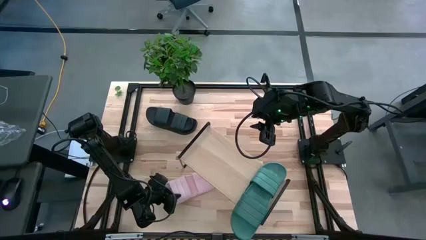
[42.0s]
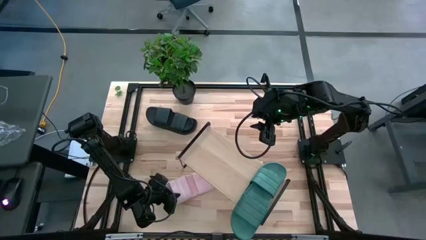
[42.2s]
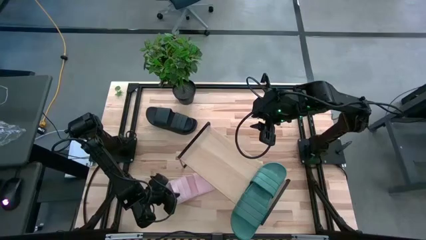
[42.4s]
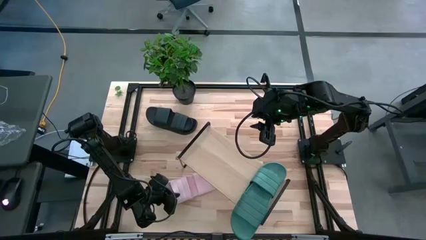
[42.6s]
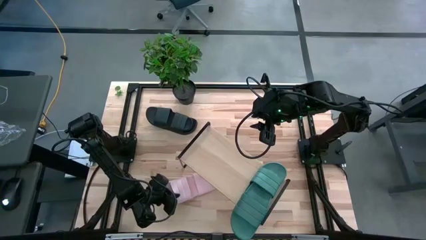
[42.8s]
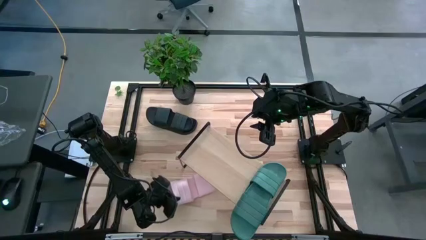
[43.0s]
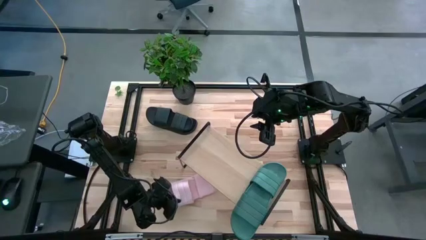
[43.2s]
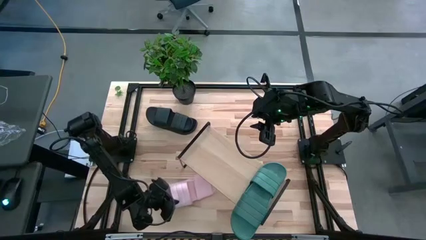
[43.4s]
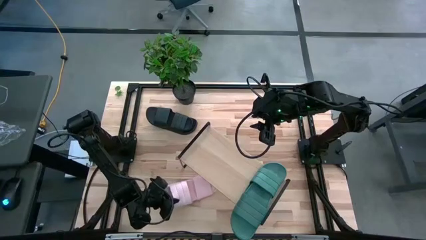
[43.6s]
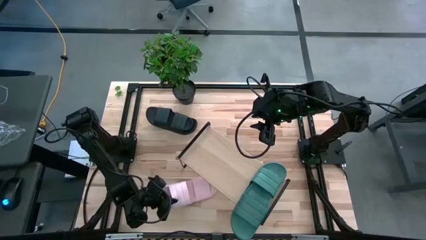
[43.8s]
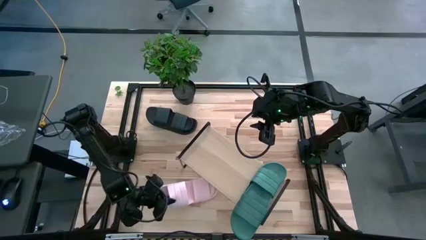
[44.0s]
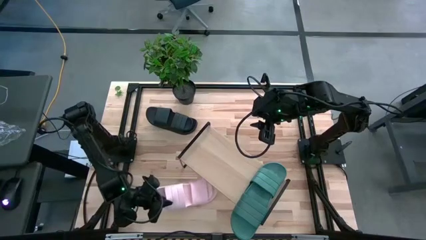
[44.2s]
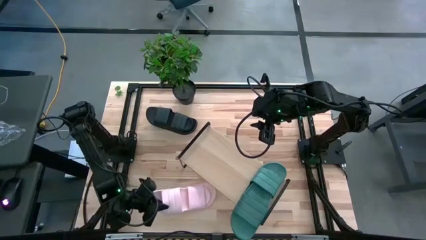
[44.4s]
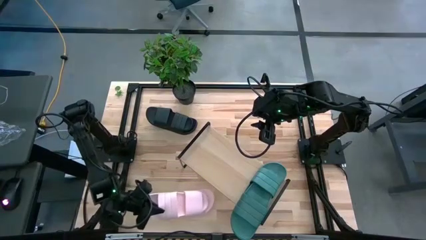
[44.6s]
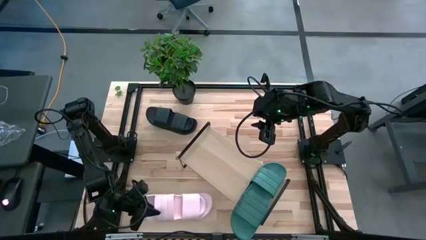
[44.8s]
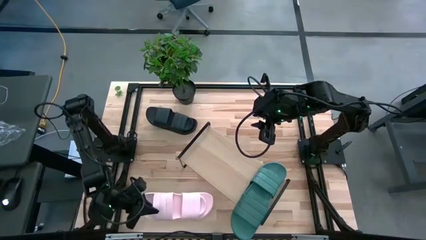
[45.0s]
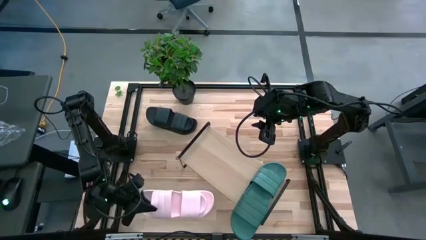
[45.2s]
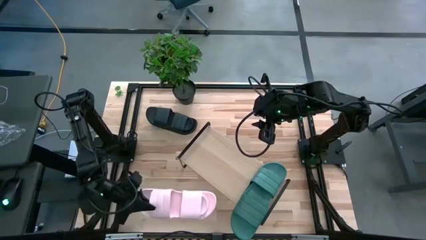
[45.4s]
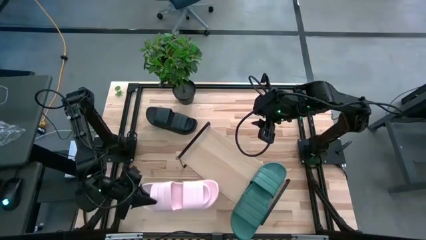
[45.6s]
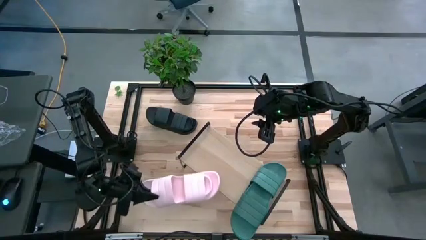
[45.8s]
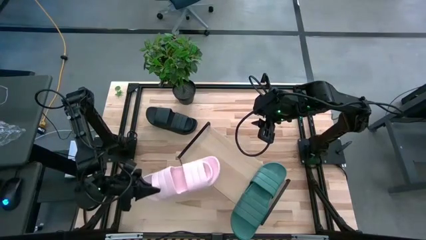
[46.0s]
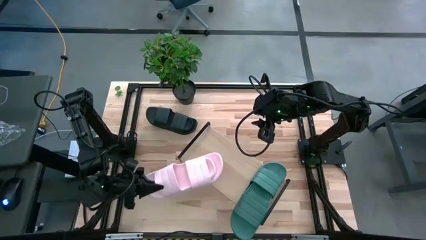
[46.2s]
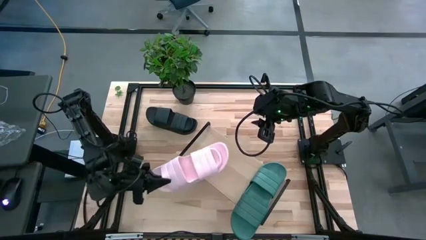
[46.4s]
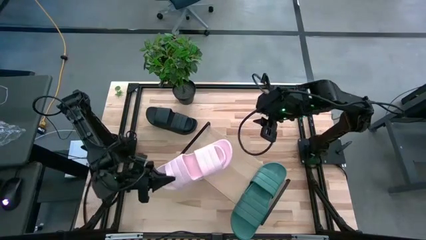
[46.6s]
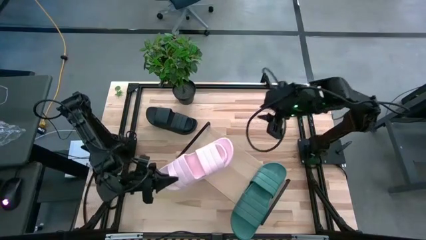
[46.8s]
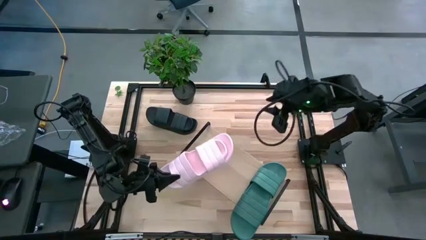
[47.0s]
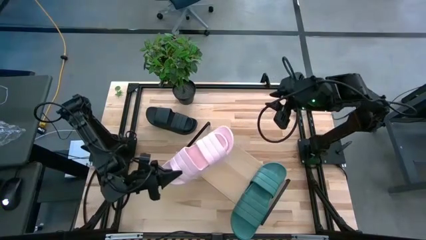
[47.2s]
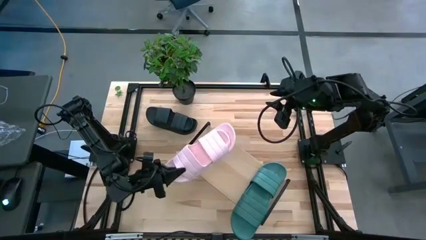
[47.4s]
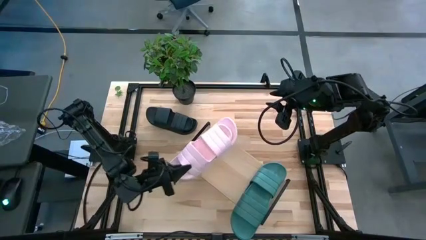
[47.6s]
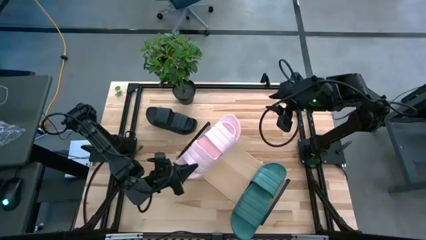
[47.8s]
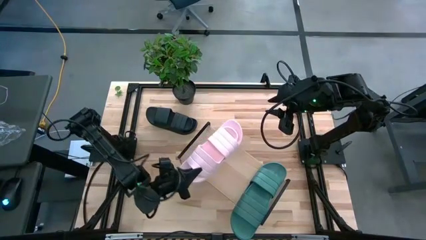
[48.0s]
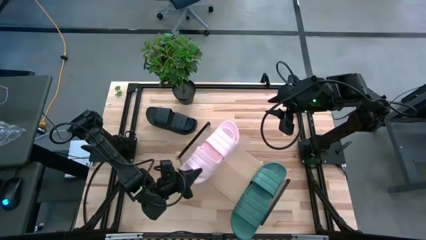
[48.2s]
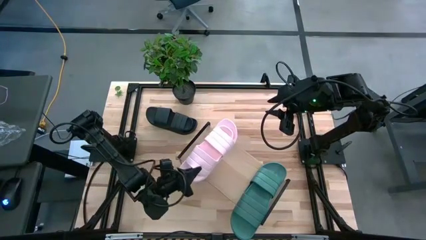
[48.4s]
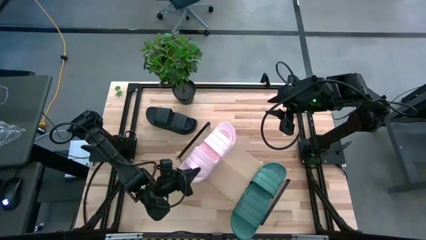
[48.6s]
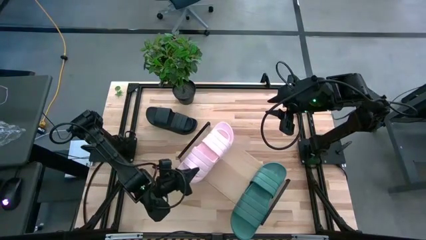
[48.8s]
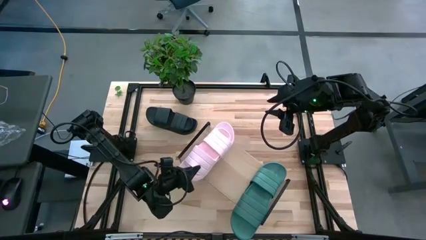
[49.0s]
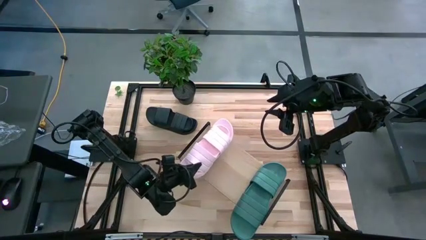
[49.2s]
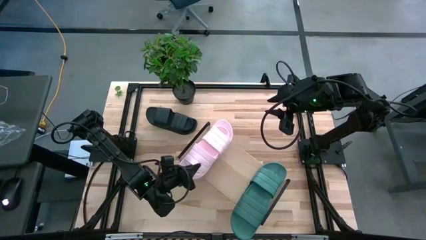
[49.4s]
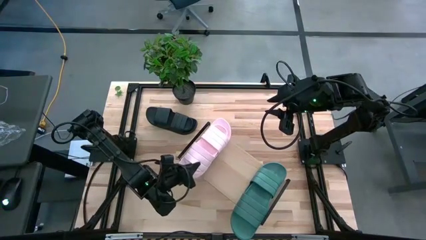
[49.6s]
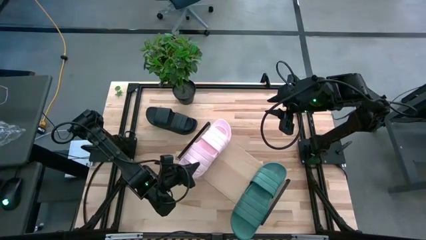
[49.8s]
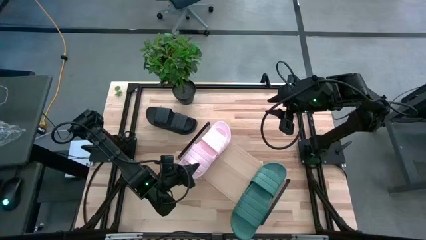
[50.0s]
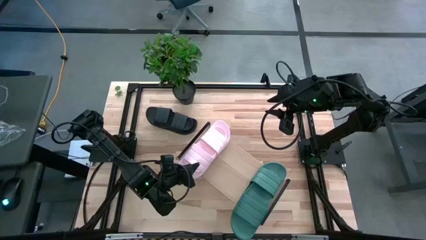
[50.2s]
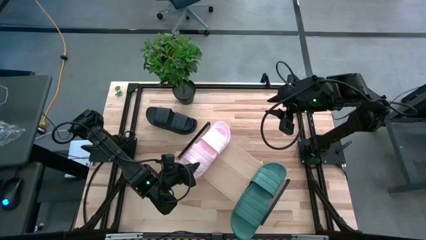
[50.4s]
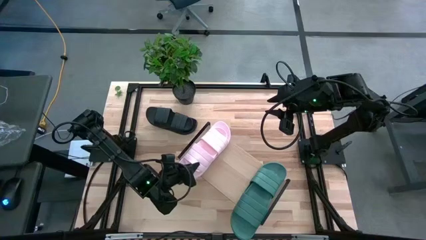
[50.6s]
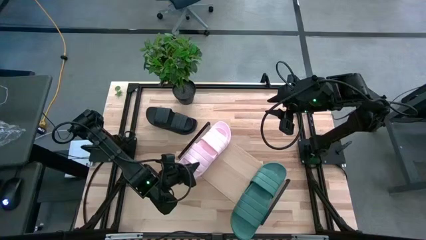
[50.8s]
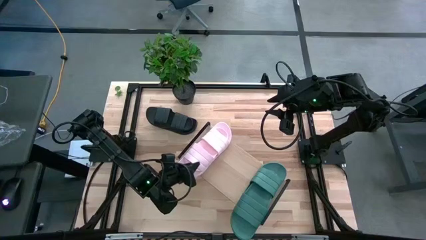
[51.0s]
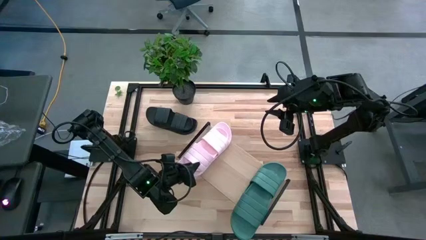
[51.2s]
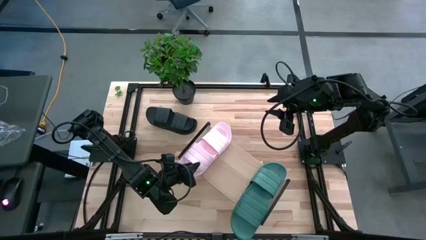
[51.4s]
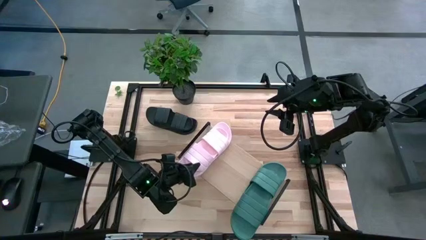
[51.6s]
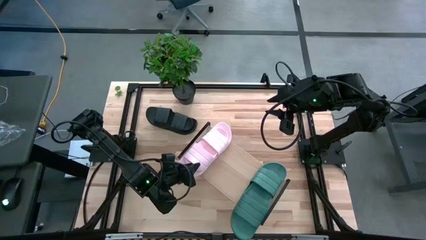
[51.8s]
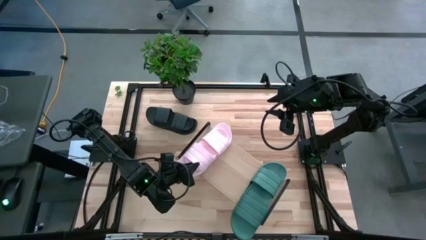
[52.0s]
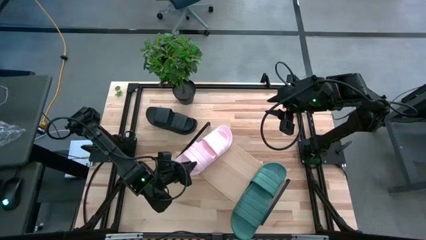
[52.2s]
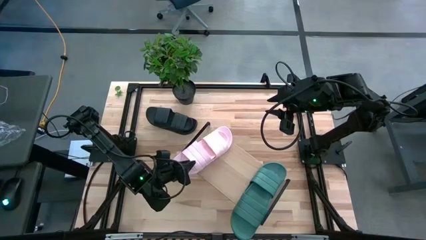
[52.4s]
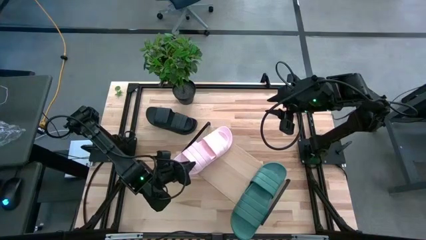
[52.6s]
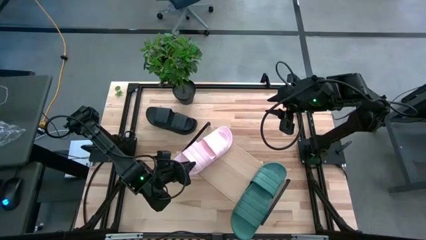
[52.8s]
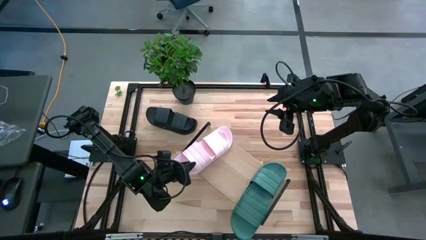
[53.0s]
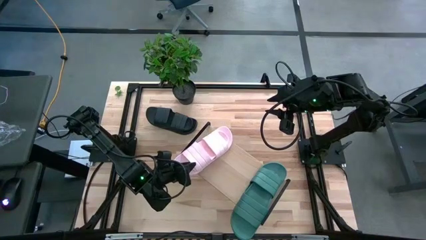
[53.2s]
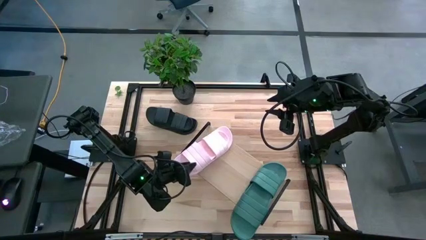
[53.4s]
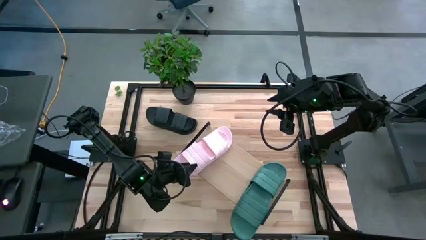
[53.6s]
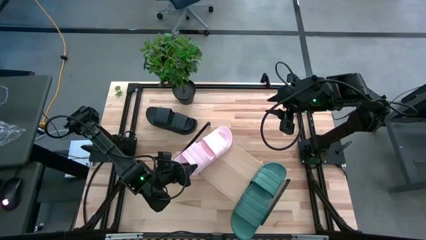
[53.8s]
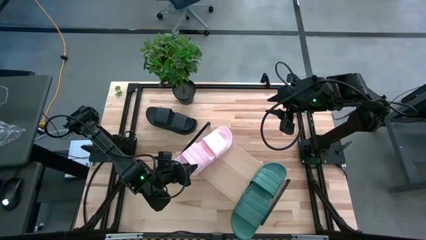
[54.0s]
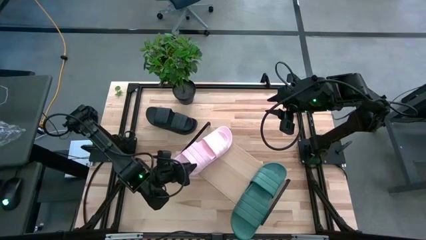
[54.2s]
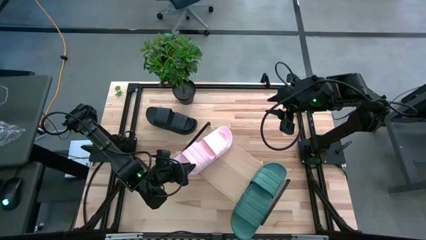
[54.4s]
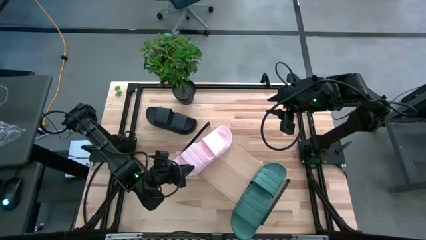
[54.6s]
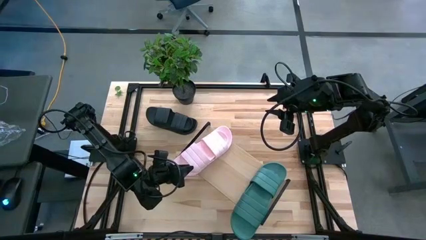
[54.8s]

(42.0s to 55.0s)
Task: Pick and place slides into the shelf
Put the pink pair of slides on the shelf

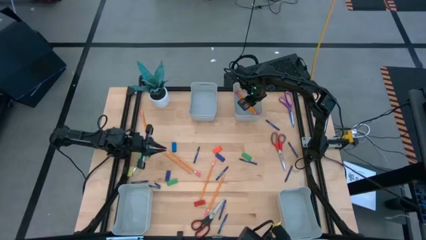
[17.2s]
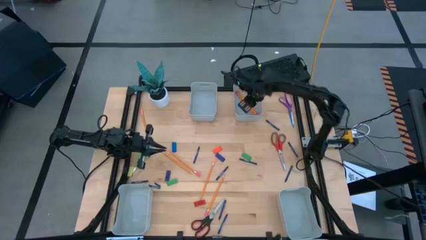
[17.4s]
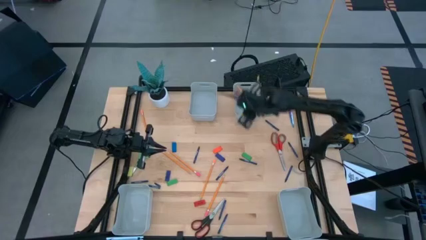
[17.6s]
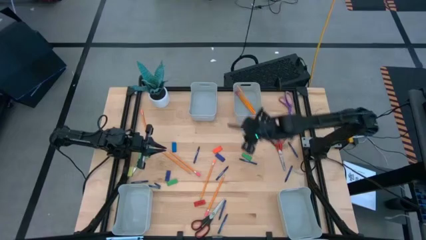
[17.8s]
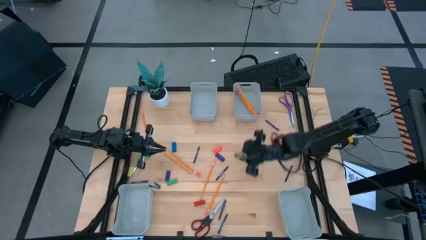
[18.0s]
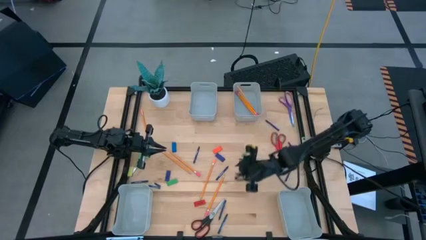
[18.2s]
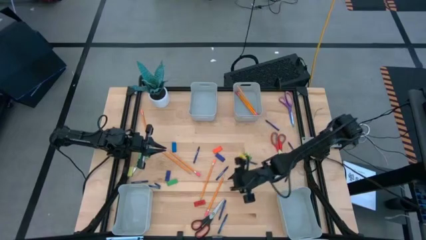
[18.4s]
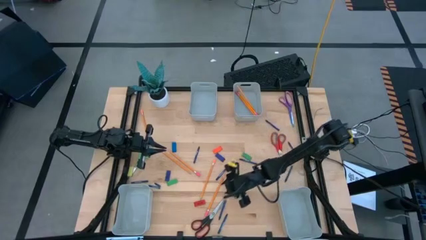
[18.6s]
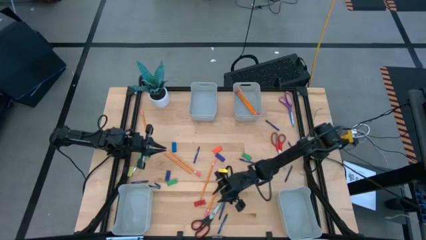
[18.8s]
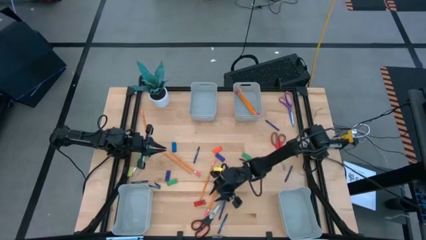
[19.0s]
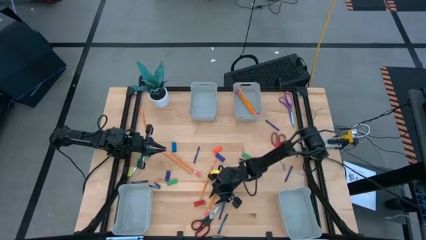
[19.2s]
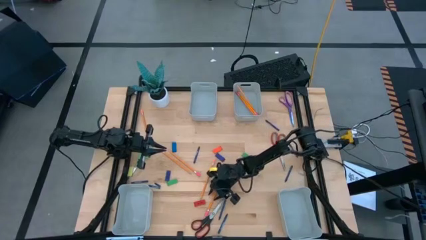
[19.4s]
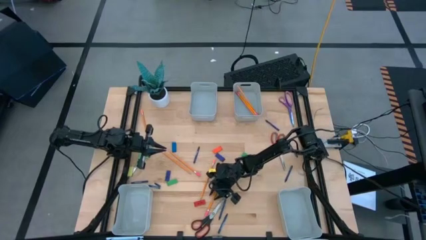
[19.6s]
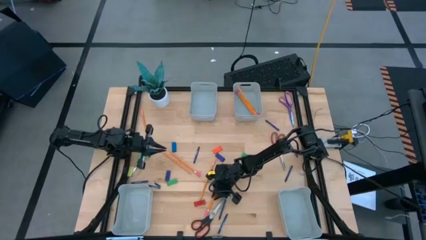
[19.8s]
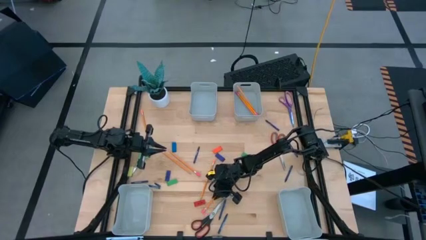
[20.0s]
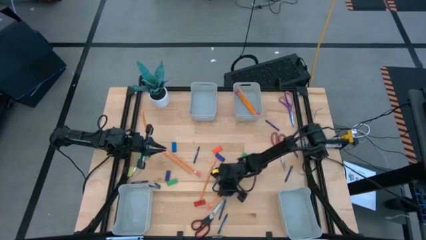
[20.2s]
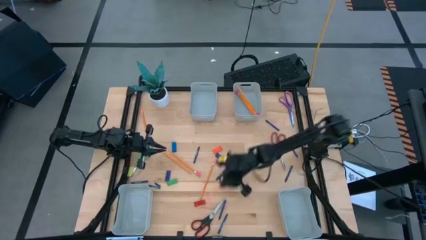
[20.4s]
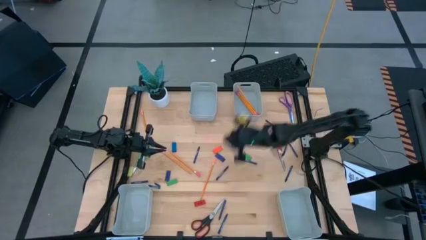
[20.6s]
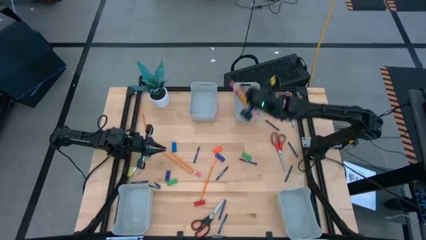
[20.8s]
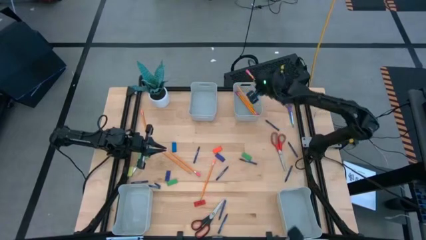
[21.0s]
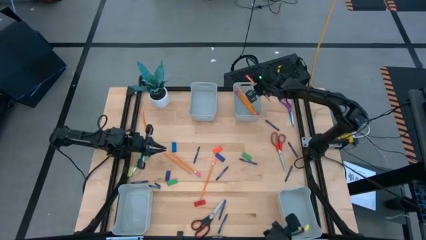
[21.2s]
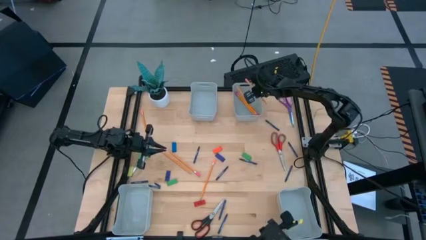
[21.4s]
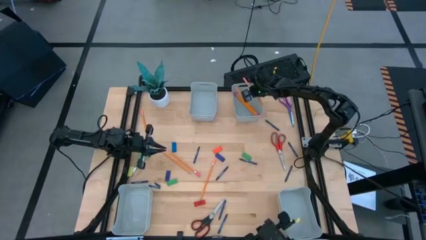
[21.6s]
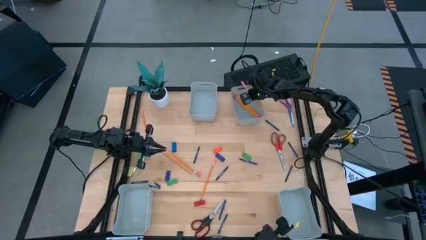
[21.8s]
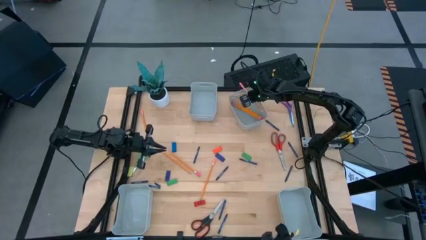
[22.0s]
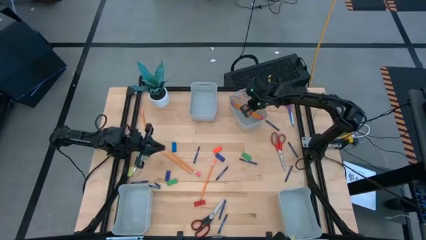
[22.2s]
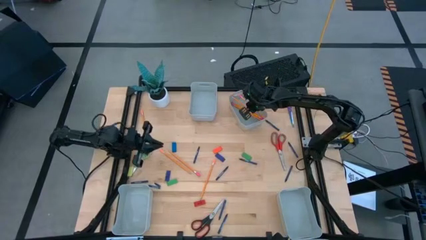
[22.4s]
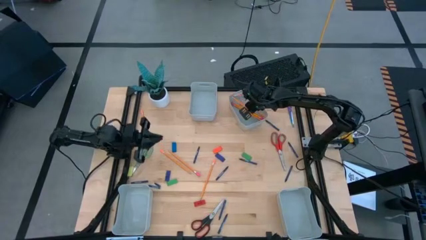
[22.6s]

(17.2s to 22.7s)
Task: Sort crayons/erasers/pens/pencils in bins
Put the yellow pencil into the top right bin
